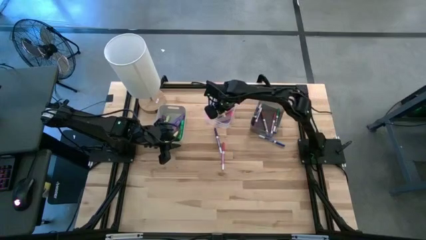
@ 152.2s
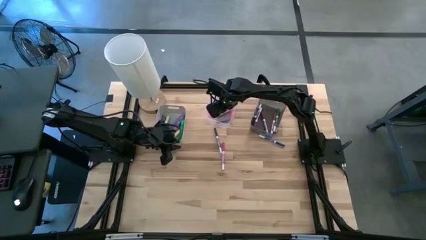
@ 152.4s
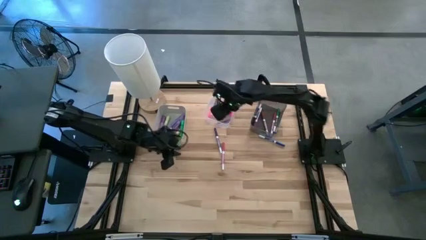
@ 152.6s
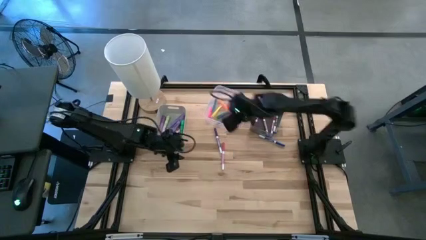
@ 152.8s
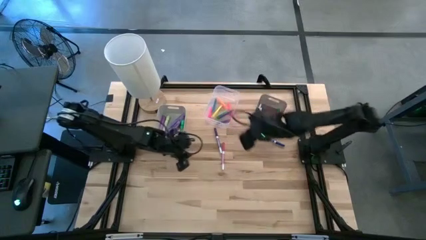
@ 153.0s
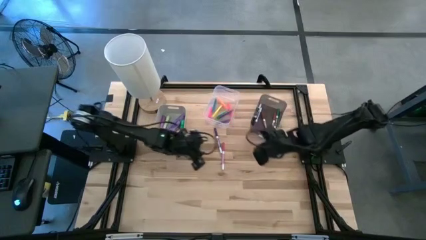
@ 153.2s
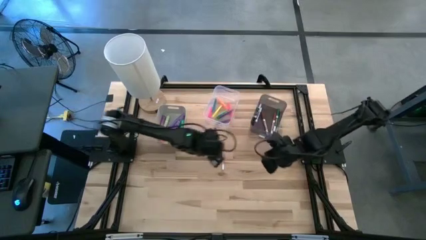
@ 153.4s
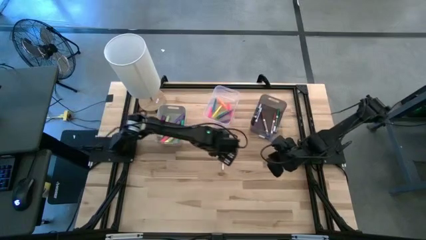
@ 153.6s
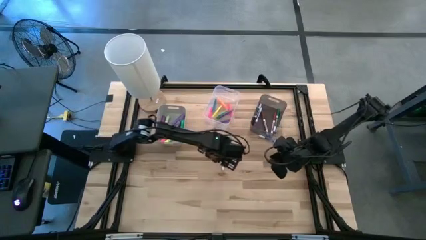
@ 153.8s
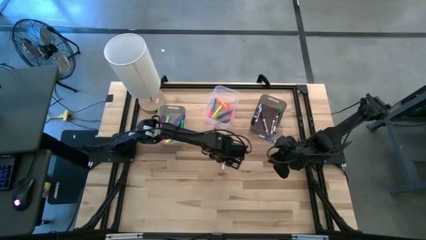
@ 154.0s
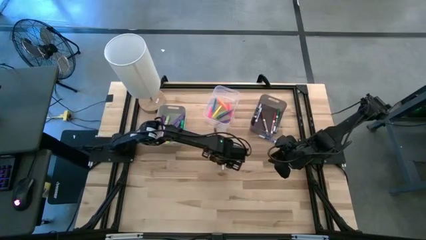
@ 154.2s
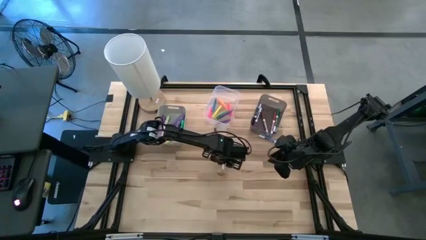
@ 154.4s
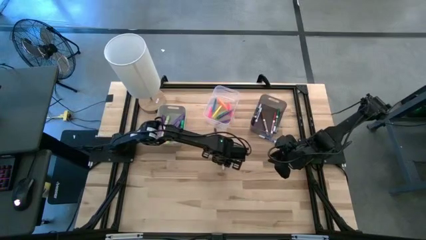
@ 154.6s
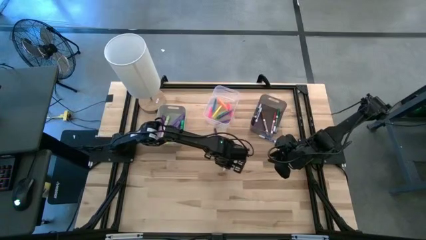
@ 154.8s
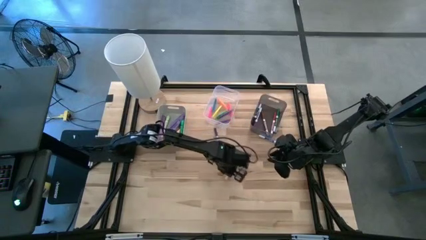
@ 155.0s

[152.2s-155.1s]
Task: Pick & Place Markers
Put the pink highlighter into the black bin

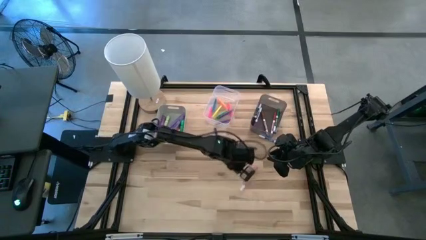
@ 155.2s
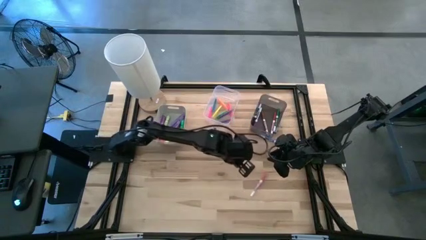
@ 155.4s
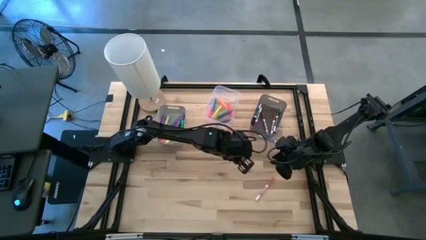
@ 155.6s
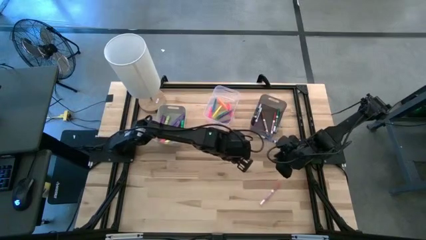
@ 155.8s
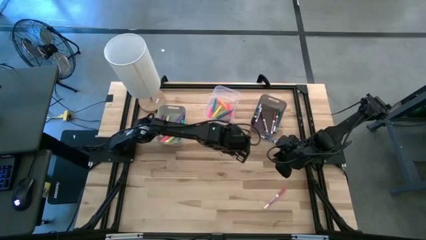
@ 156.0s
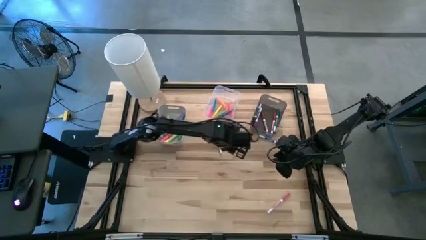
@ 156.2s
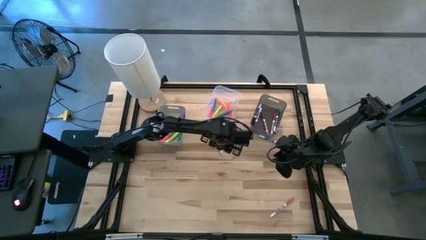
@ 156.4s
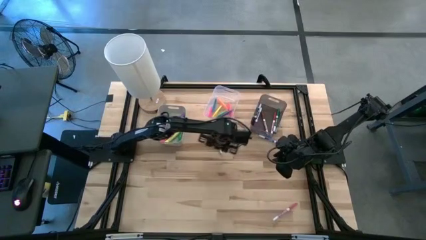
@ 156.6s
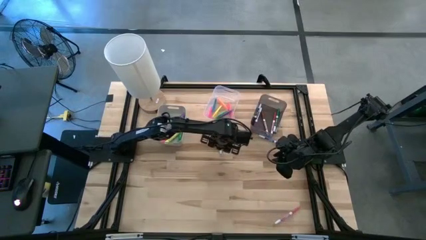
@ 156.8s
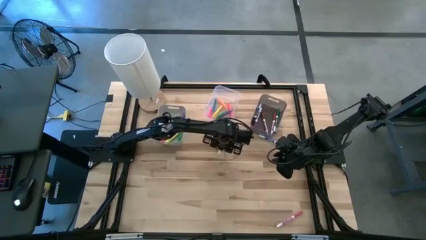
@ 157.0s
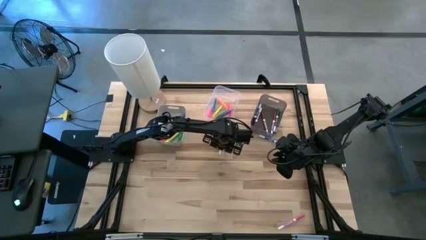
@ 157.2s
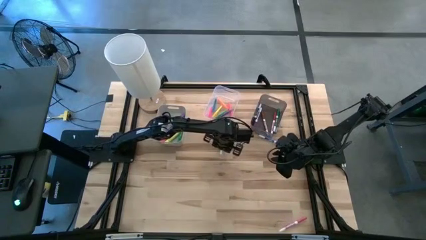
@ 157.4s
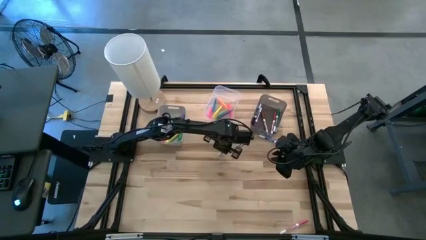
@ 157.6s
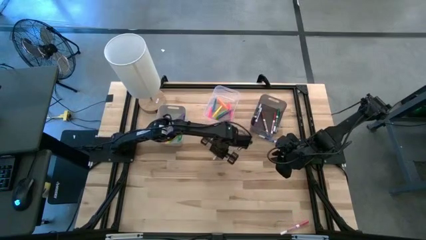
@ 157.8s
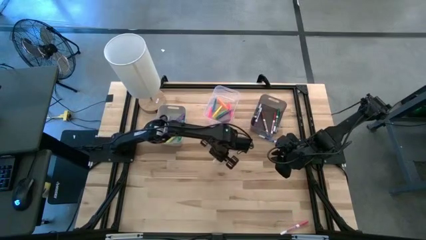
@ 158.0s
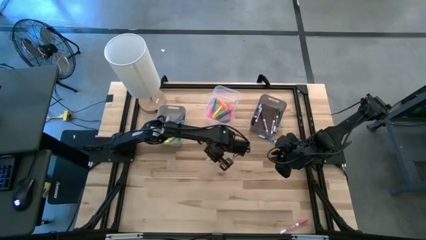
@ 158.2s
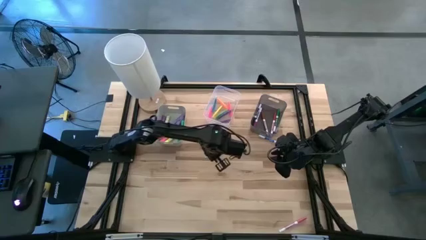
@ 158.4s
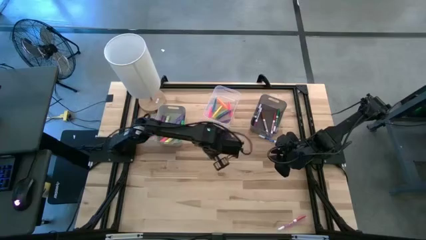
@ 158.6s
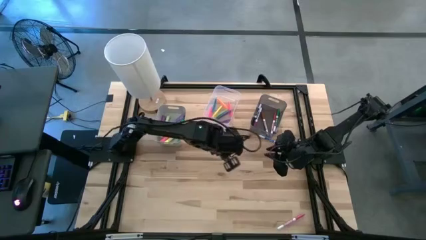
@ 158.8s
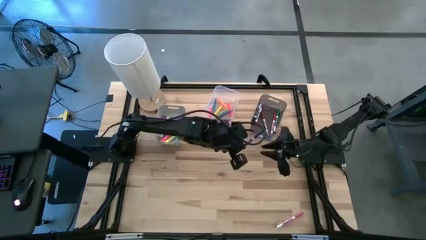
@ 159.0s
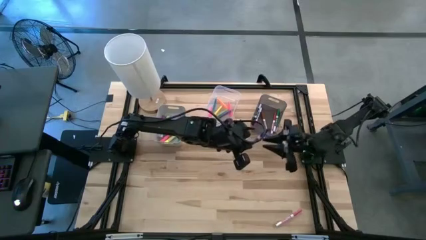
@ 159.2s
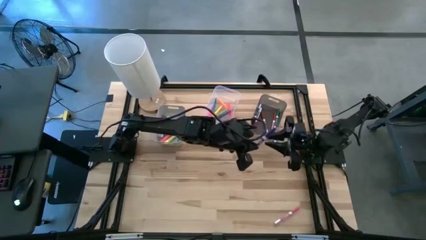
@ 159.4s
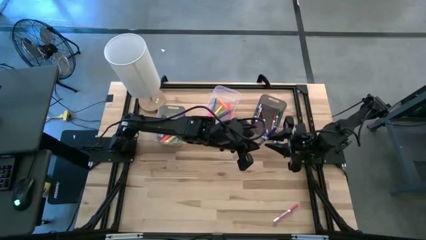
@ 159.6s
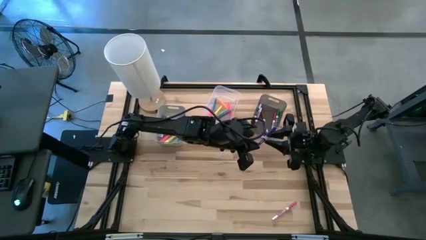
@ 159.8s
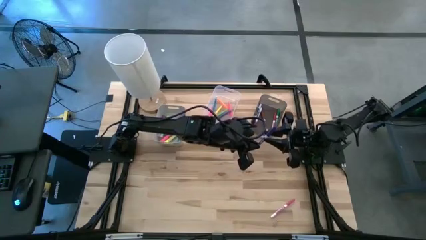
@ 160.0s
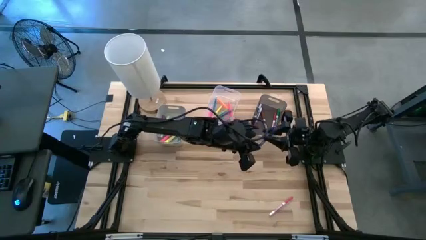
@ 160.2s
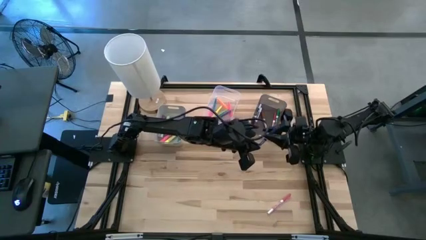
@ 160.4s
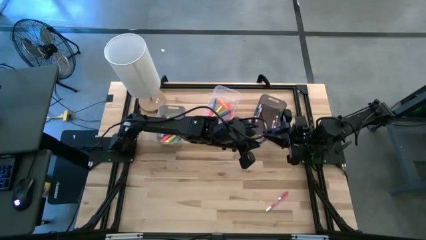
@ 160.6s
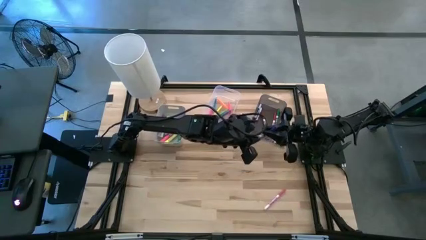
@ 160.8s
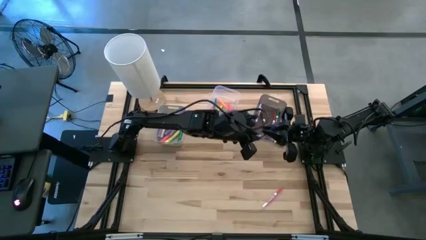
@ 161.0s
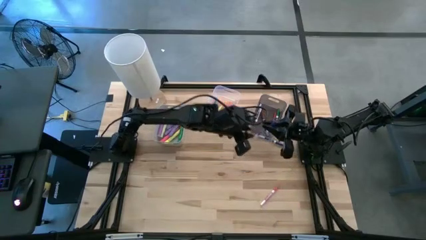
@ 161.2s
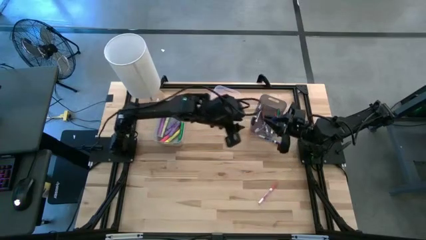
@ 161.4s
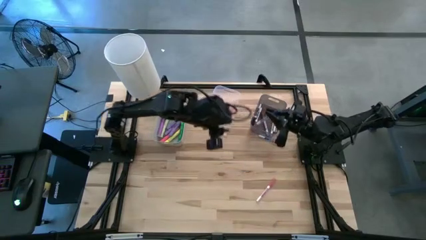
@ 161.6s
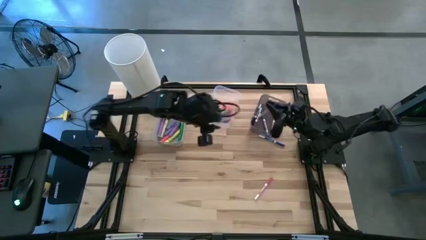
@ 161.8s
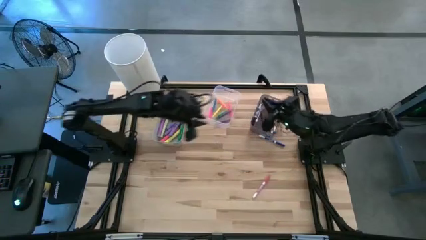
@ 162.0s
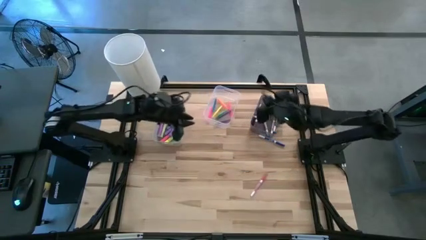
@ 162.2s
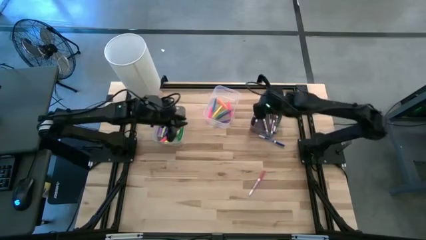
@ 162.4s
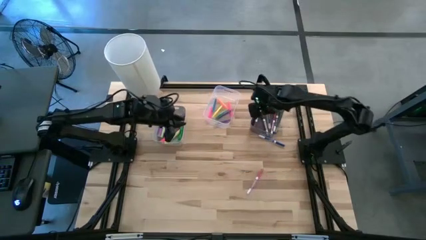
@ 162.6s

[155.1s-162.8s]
Put the blue marker into the black bin

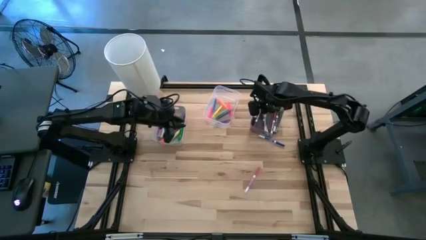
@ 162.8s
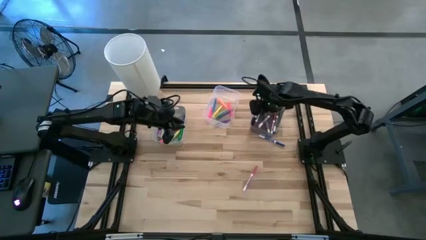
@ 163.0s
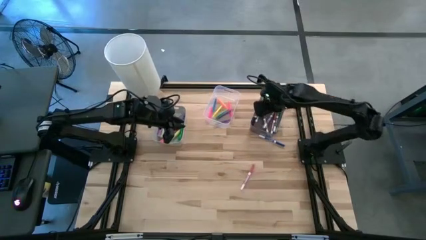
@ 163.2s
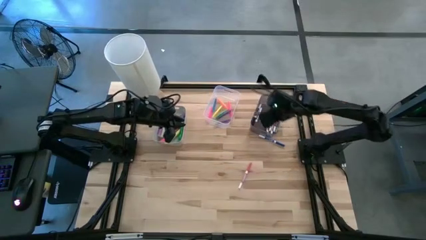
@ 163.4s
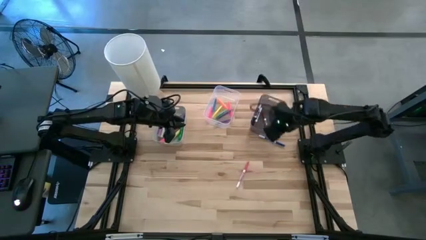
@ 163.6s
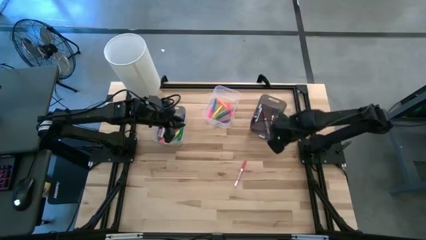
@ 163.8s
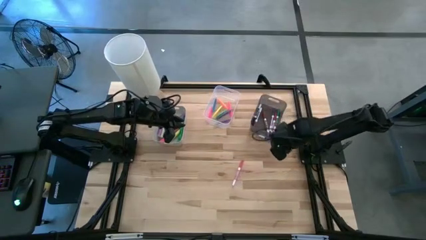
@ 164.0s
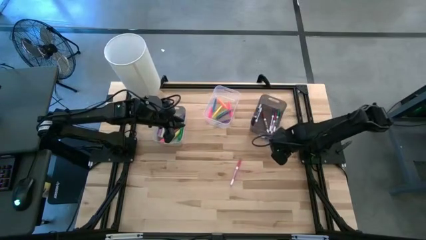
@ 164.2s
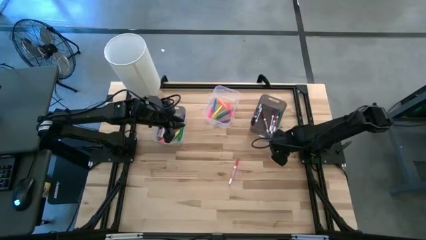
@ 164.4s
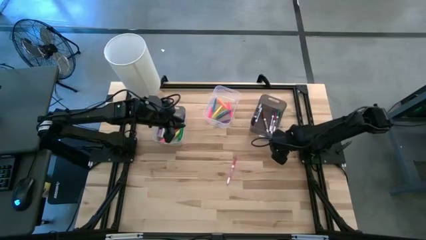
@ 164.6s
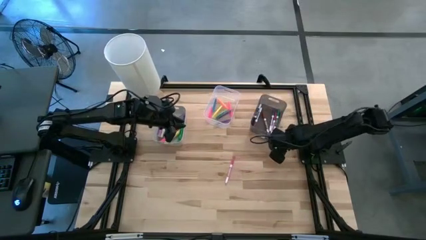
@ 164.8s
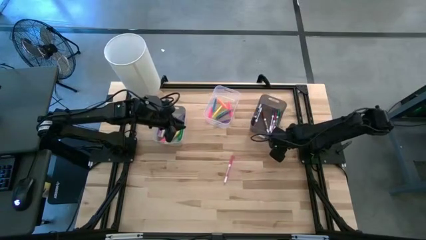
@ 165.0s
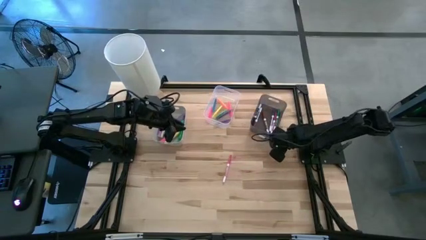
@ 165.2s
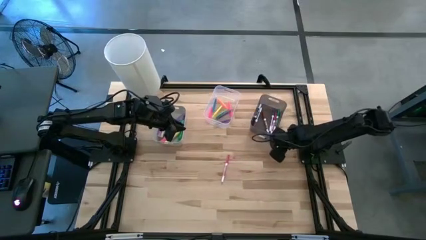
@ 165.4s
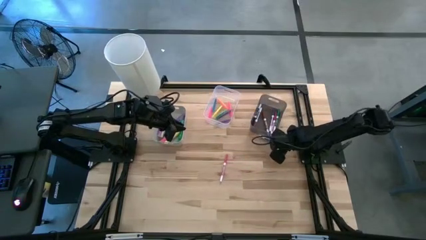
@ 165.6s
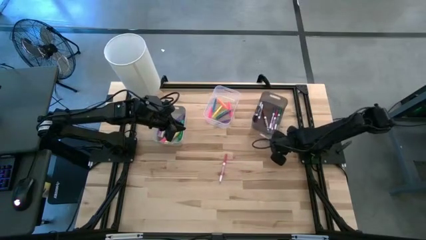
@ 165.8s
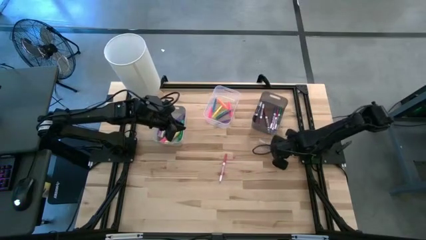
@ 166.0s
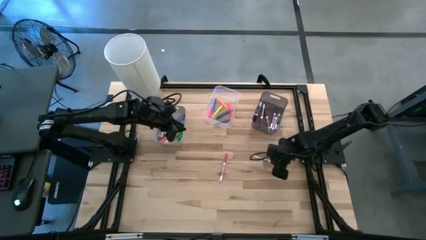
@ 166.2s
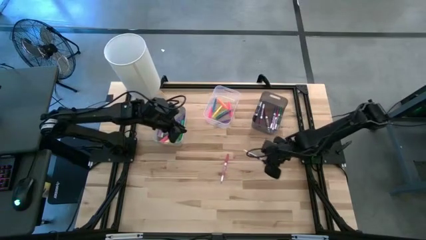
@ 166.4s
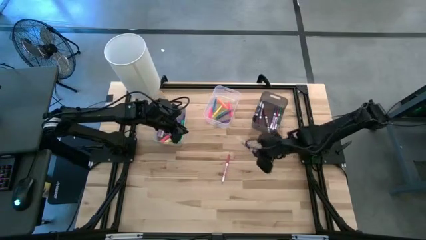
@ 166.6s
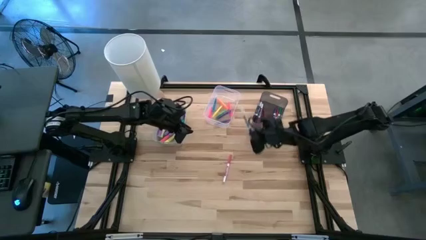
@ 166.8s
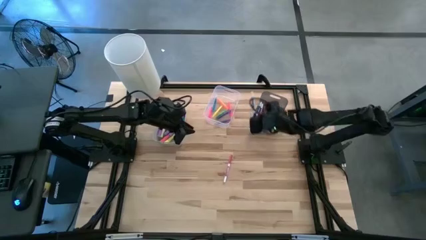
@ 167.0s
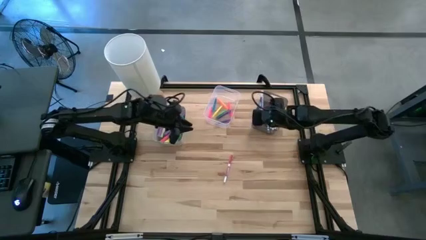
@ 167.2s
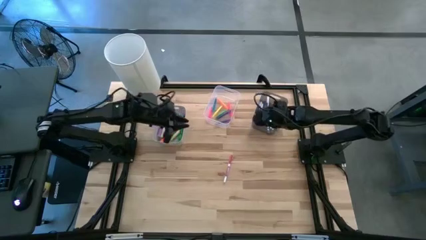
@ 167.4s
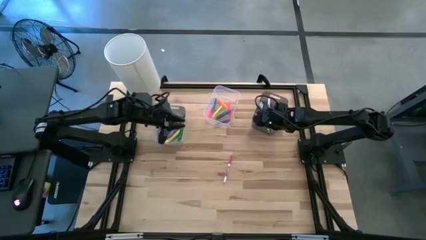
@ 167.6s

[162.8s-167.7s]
Put the blue marker into the black bin
